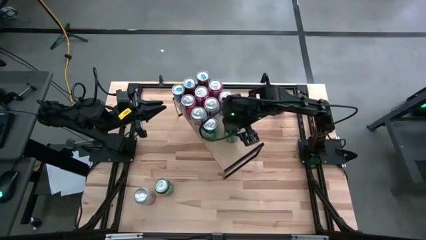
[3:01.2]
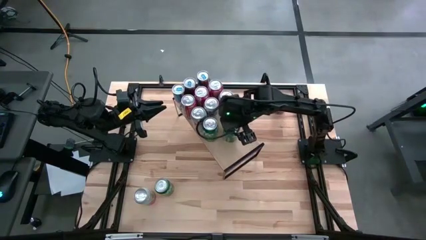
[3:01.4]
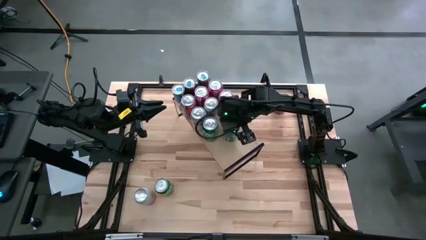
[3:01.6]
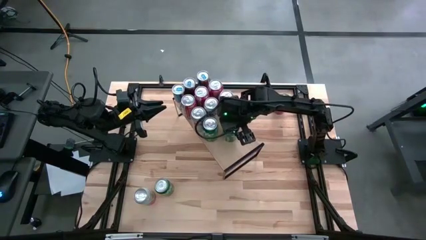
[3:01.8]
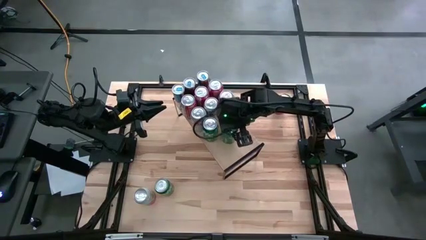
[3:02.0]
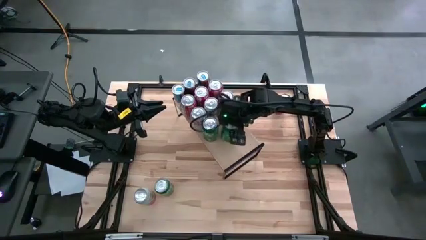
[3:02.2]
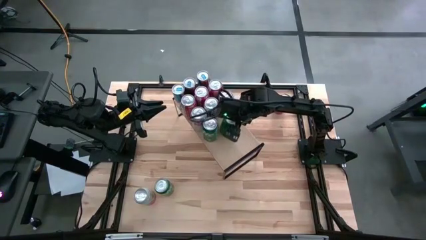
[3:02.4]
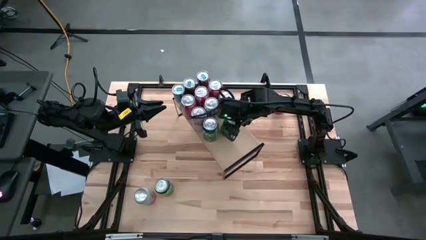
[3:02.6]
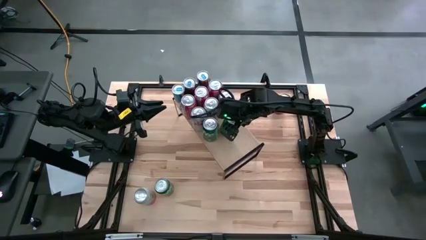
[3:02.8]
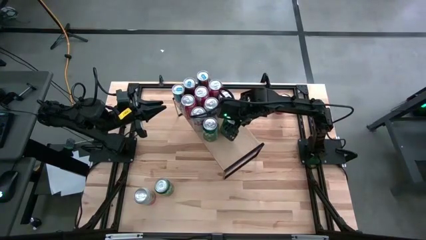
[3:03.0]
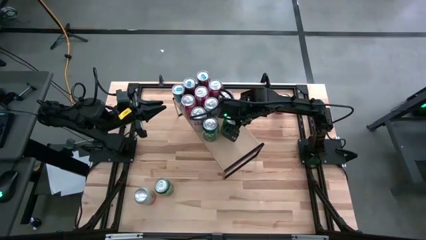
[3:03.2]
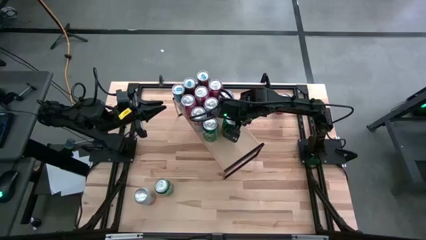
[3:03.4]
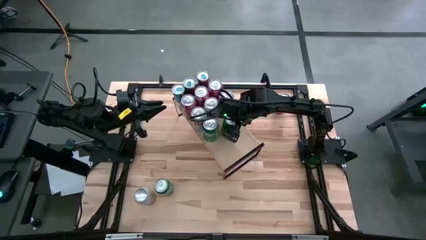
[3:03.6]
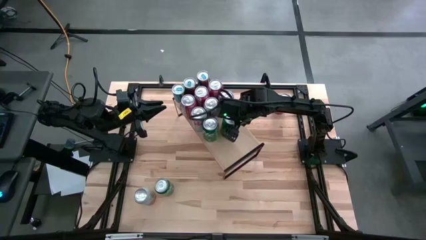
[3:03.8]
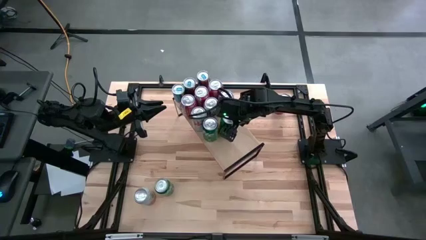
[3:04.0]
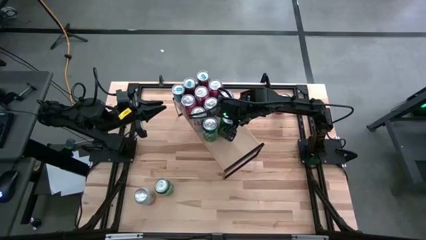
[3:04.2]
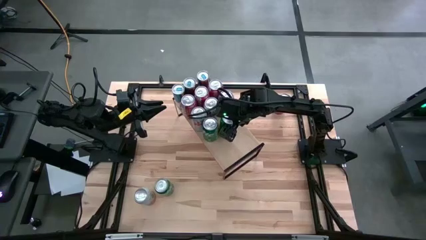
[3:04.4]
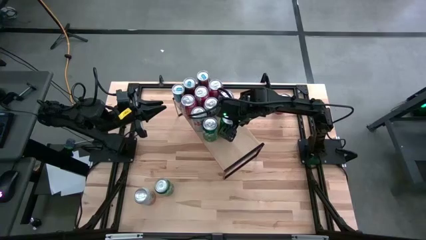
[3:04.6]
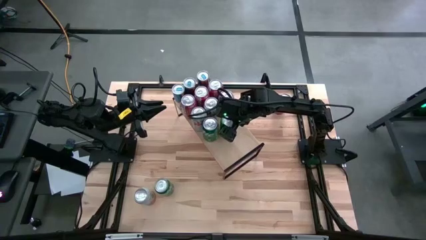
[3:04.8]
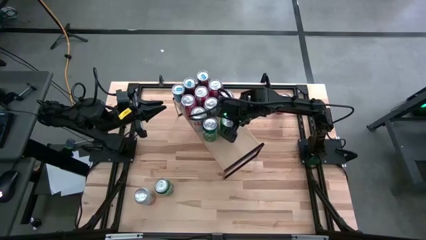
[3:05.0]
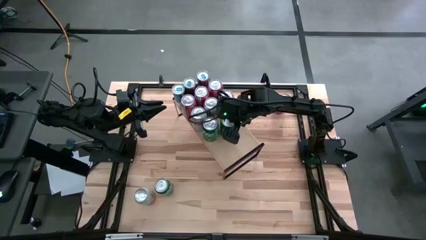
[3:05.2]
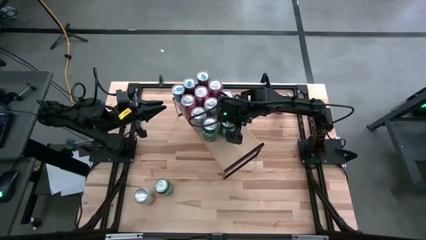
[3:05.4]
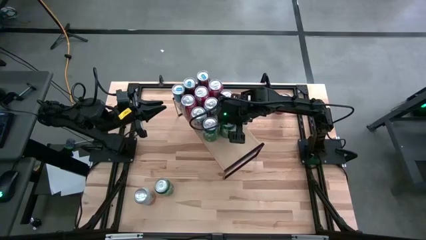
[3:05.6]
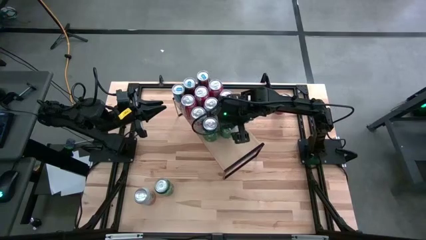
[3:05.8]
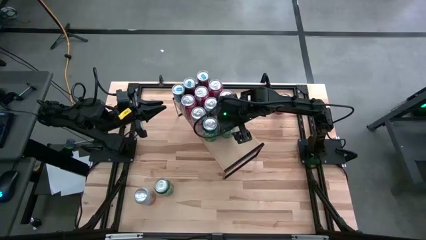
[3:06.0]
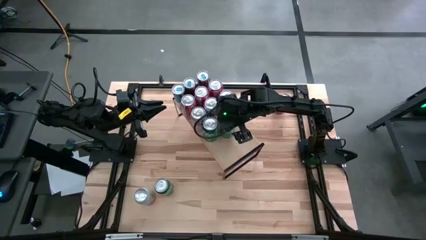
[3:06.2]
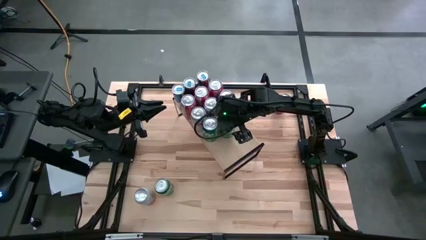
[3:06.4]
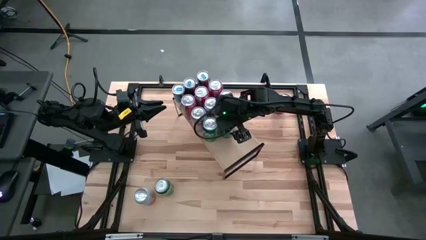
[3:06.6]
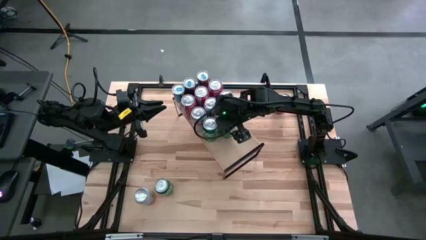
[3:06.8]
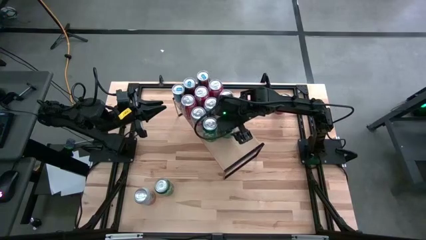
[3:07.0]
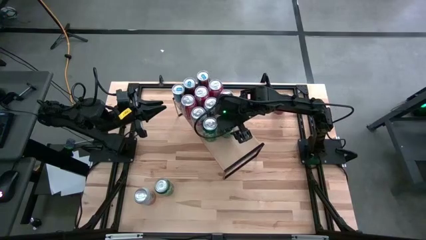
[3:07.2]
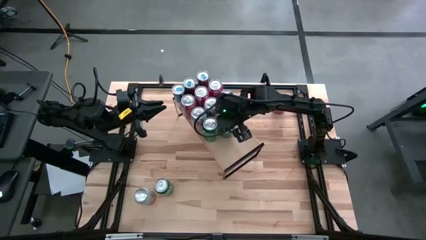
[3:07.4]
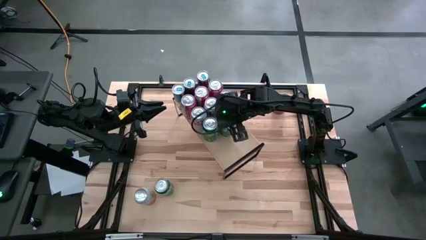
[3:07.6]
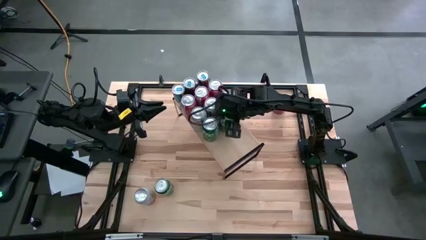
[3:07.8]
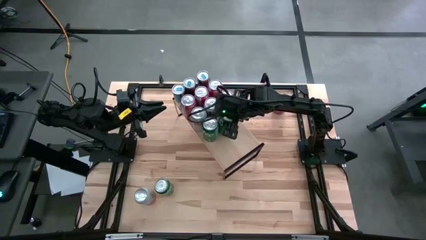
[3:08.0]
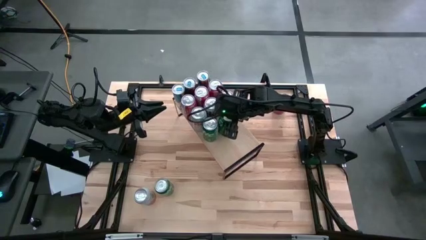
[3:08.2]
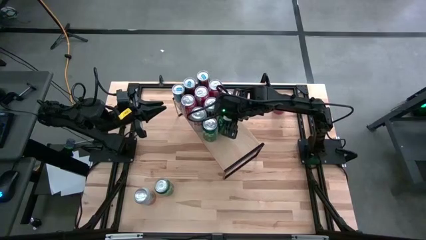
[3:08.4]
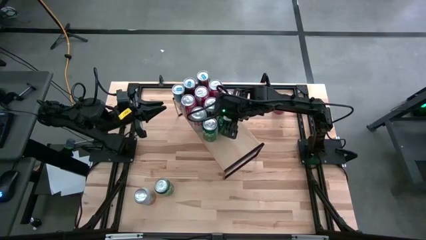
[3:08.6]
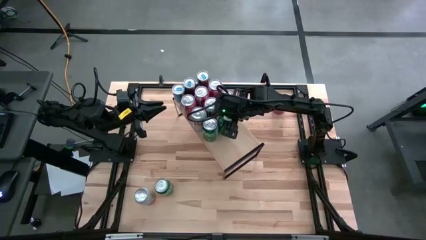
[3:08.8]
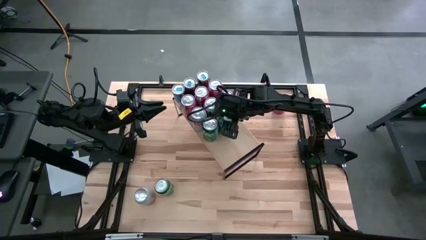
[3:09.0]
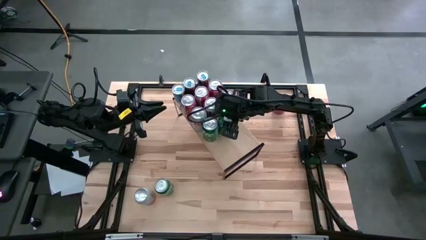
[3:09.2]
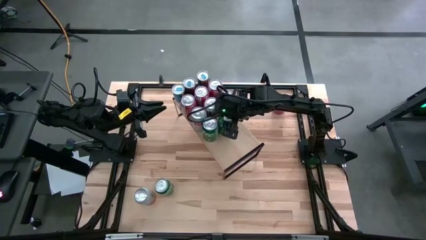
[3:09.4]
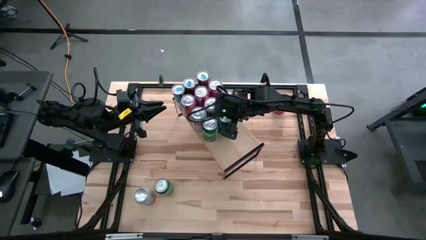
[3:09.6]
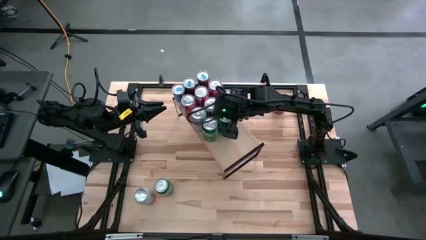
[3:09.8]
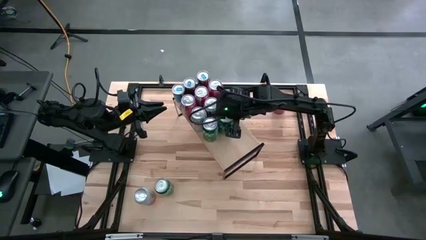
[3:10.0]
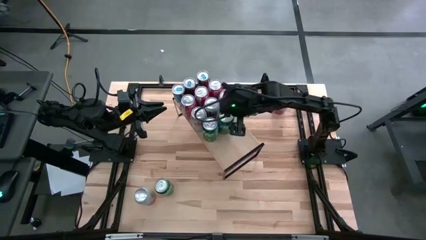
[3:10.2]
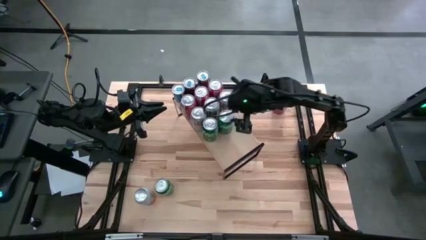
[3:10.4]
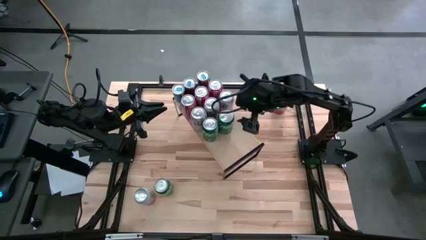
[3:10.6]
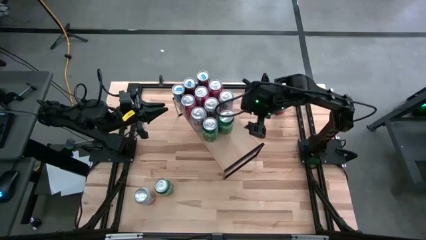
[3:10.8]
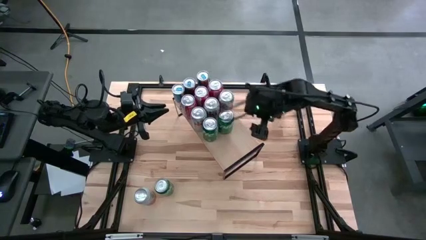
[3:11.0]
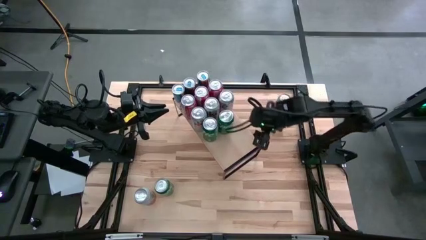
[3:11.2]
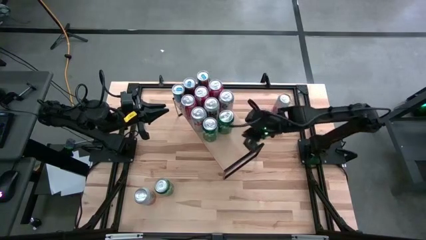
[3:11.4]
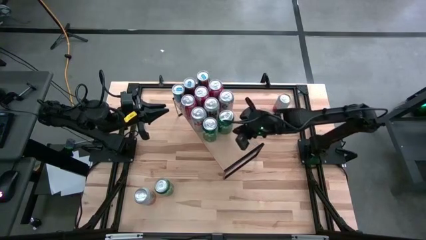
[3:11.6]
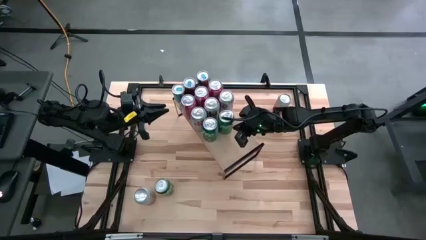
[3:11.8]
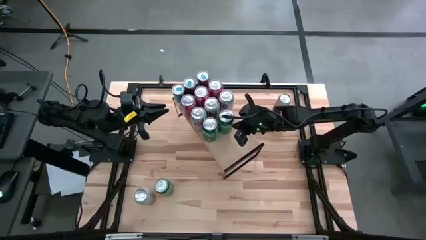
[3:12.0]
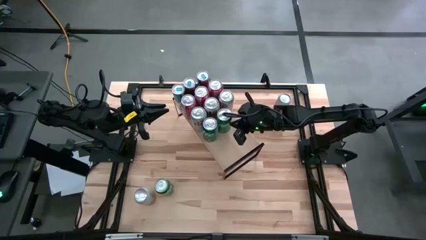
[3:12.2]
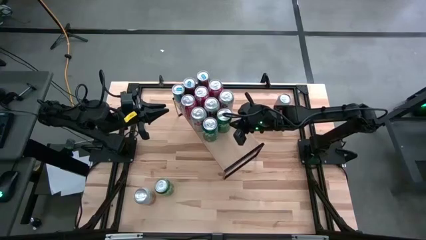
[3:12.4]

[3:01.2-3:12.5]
Task: Place canned beverage on shelf
Put the top green soda can on the shelf aligned with the other green soda can

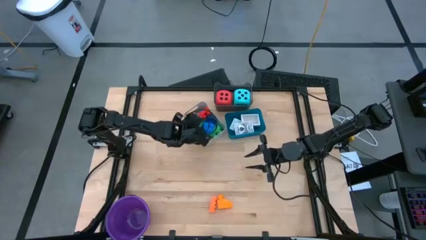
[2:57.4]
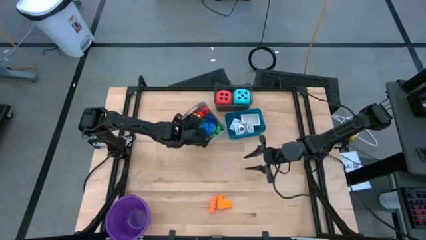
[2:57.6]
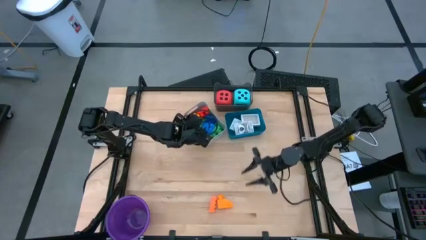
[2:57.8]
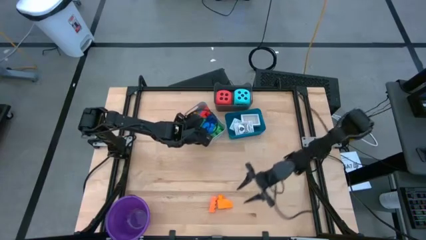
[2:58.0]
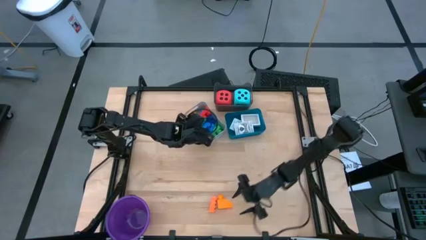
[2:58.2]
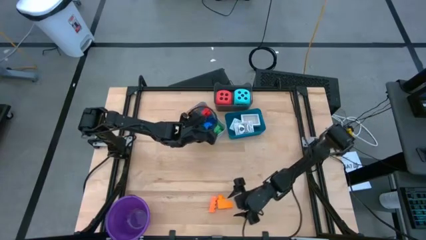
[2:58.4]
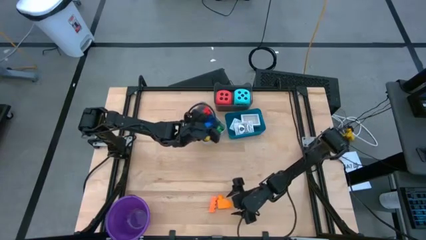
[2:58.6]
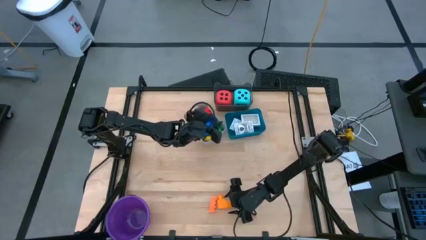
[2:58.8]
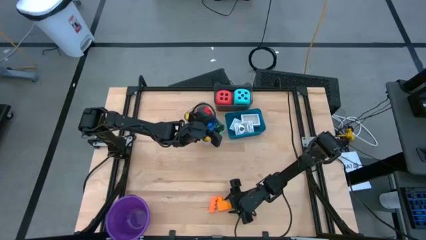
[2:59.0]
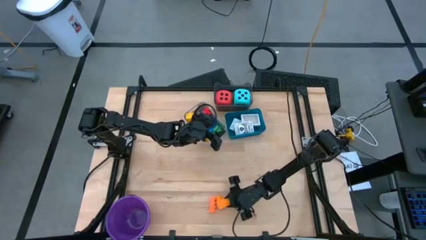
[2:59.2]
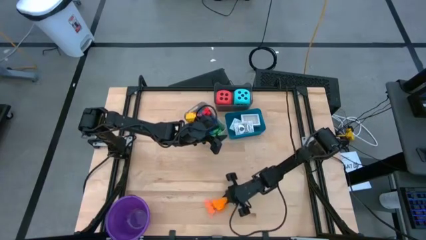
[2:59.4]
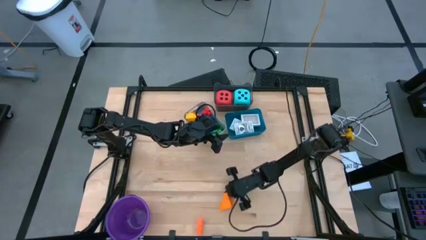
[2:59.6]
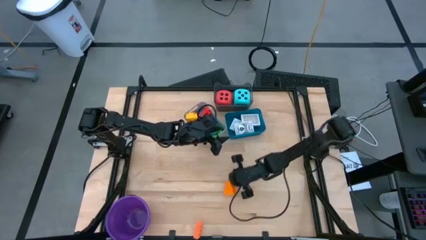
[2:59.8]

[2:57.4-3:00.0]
Task: Pick & Place Toys
Put the orange game piece into the gray bin

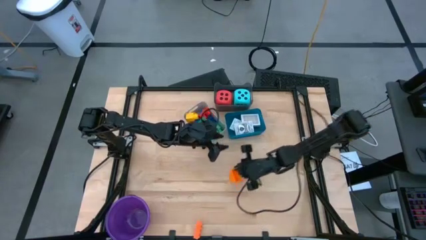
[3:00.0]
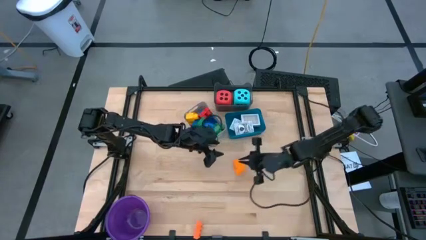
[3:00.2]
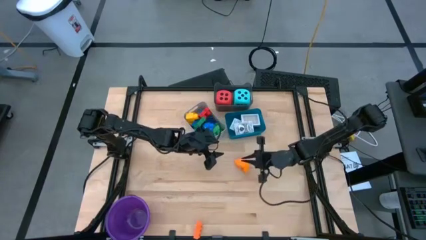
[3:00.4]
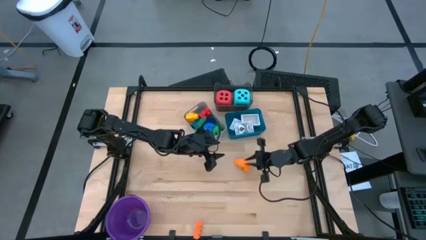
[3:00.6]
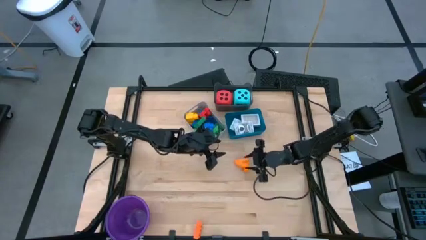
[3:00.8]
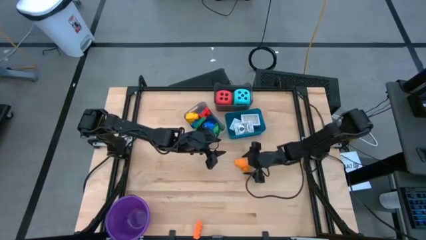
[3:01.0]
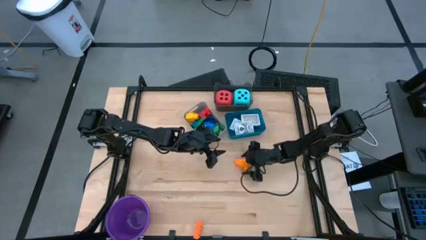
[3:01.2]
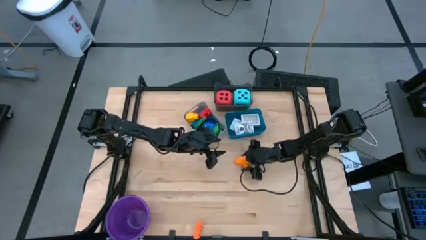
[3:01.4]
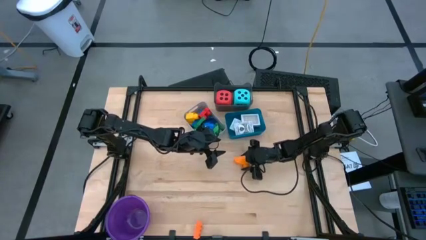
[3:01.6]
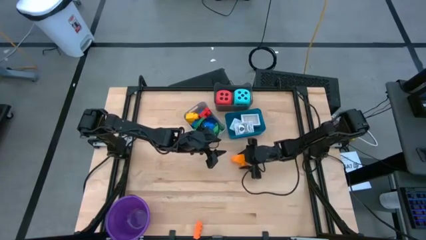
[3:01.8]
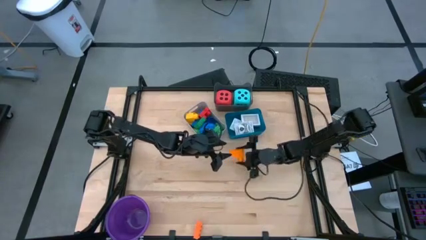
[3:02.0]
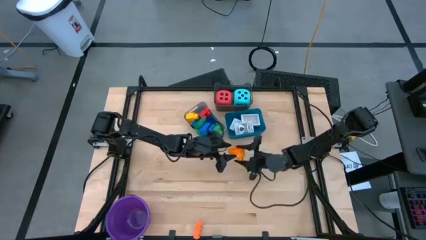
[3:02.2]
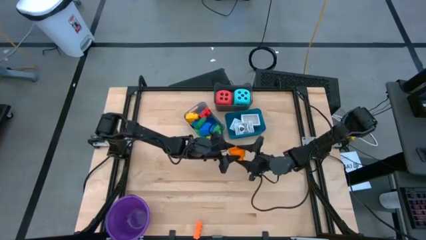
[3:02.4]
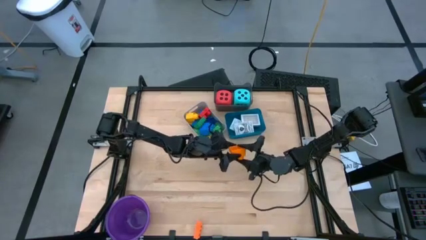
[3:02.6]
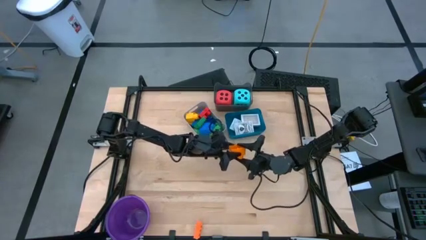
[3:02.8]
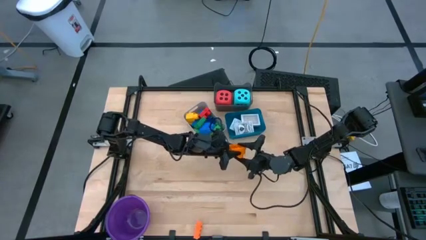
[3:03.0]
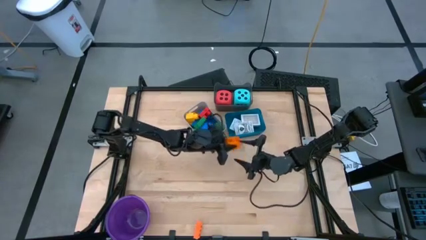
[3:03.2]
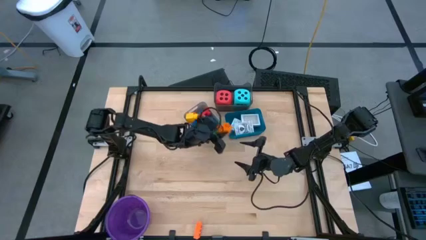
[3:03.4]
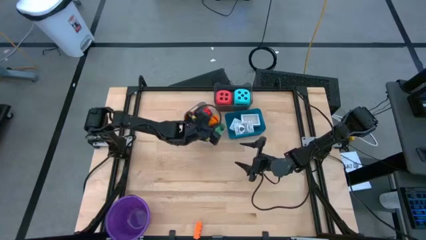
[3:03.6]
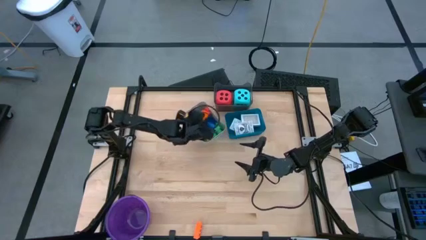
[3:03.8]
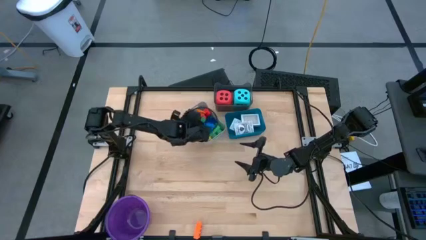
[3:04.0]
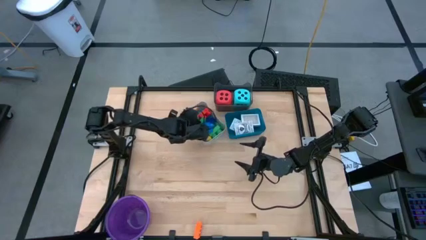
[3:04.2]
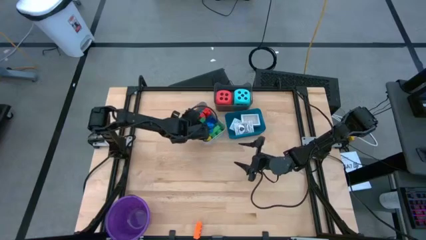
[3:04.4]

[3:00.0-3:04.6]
Put the orange game piece into the gray bin
